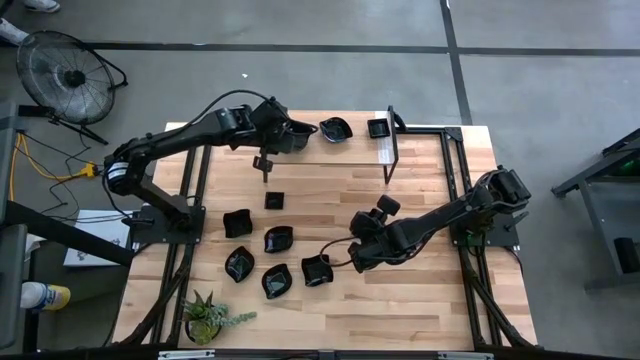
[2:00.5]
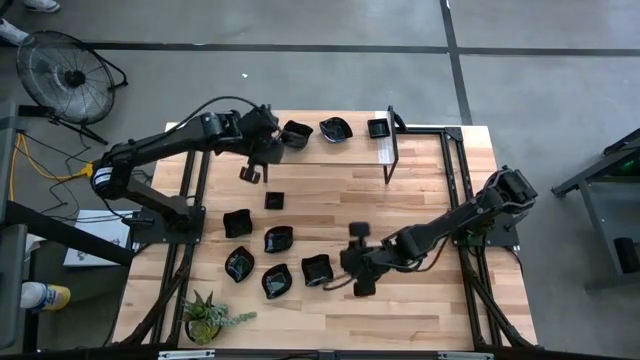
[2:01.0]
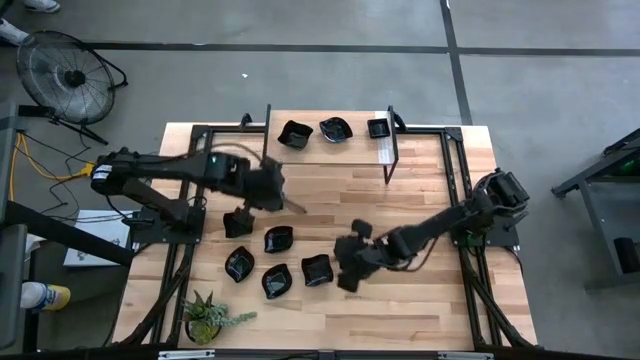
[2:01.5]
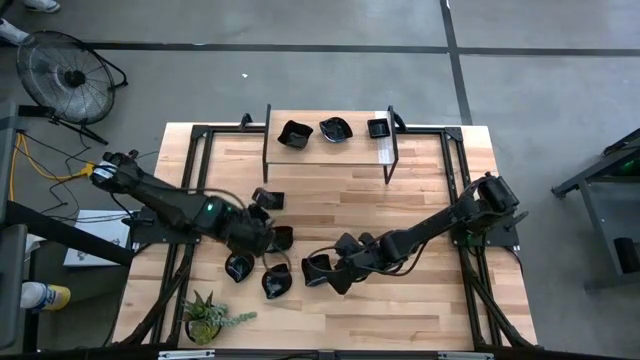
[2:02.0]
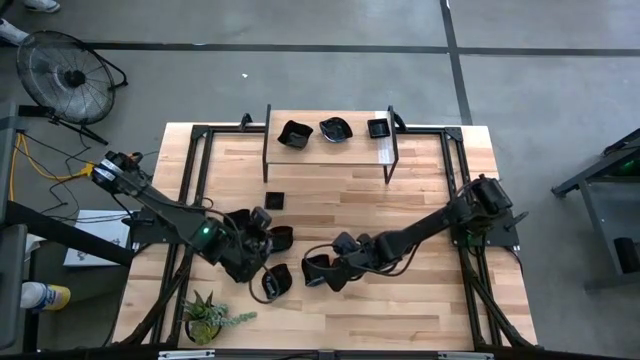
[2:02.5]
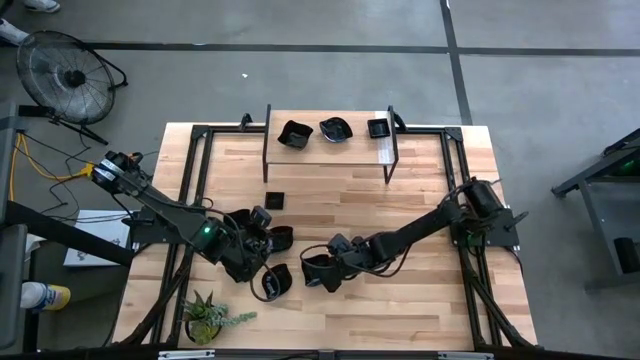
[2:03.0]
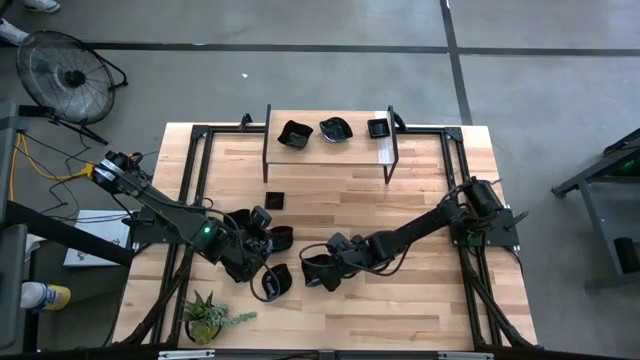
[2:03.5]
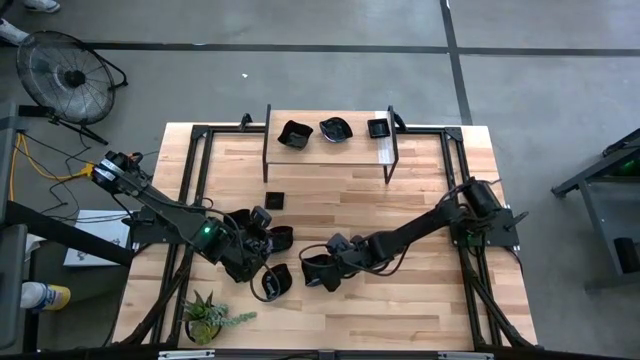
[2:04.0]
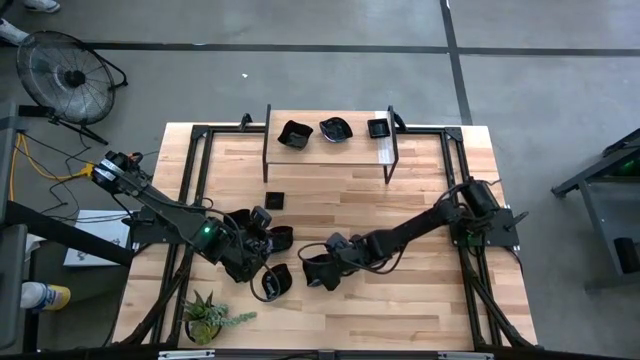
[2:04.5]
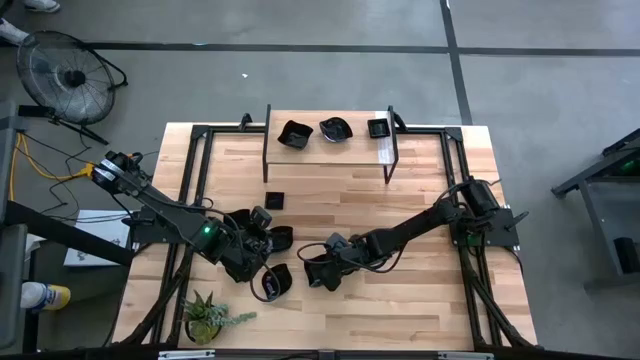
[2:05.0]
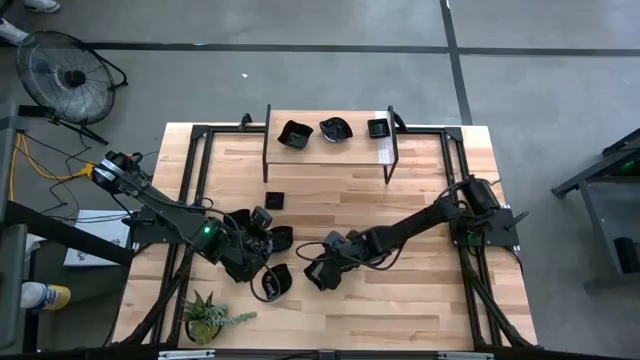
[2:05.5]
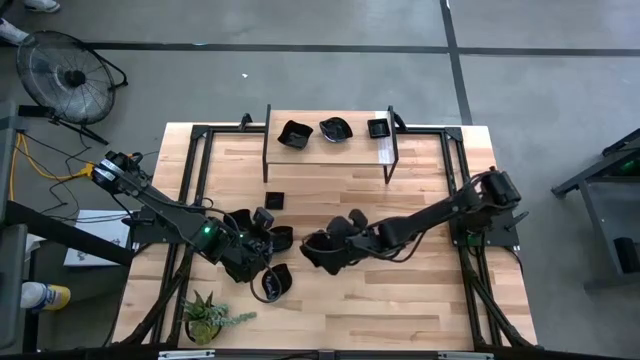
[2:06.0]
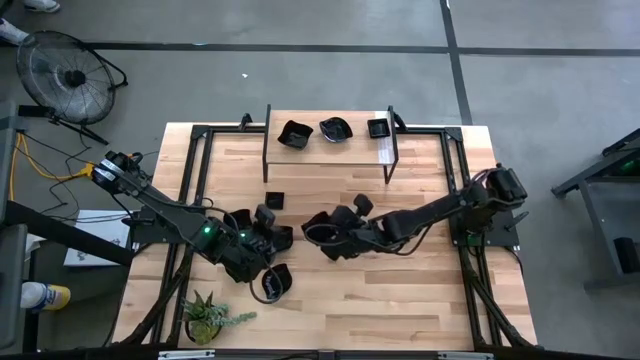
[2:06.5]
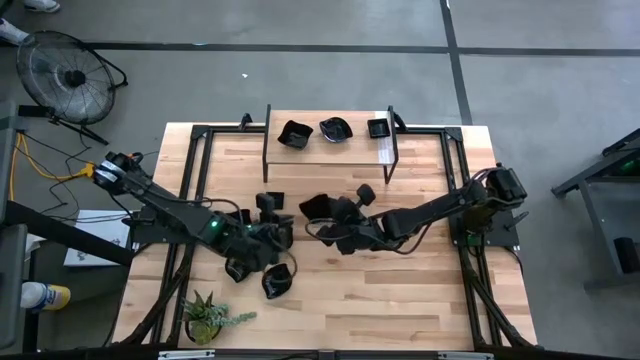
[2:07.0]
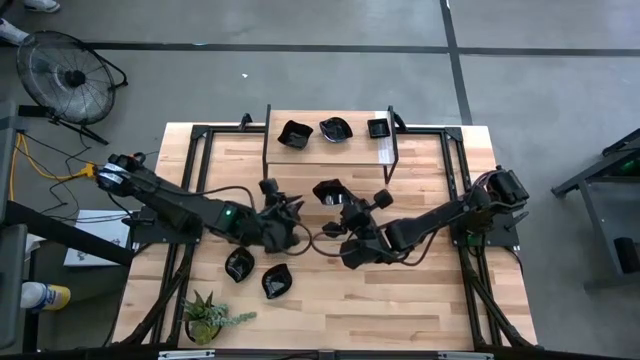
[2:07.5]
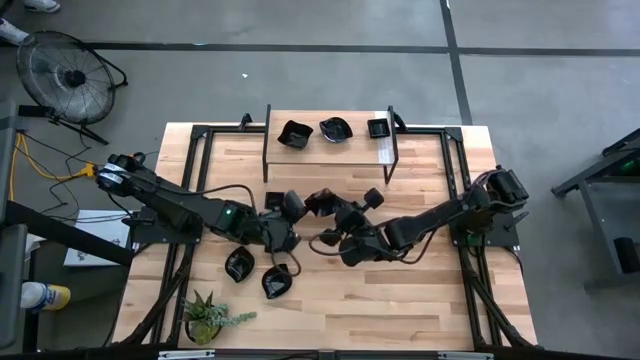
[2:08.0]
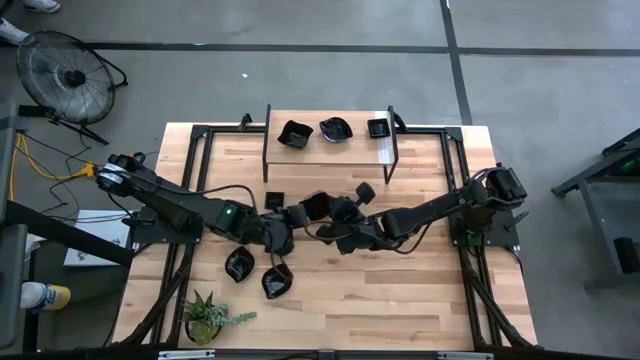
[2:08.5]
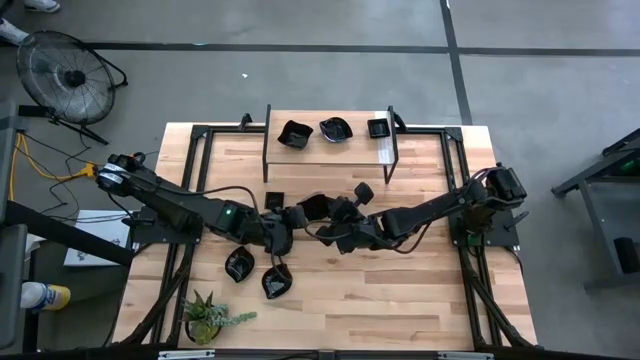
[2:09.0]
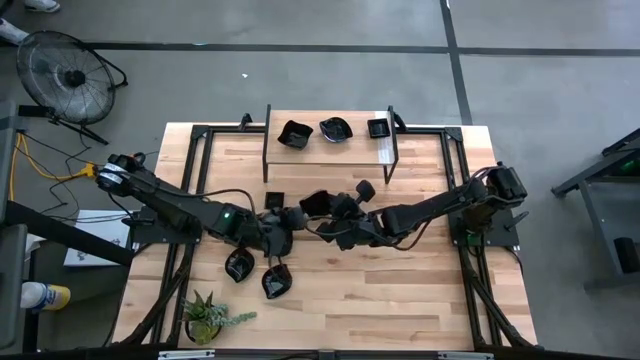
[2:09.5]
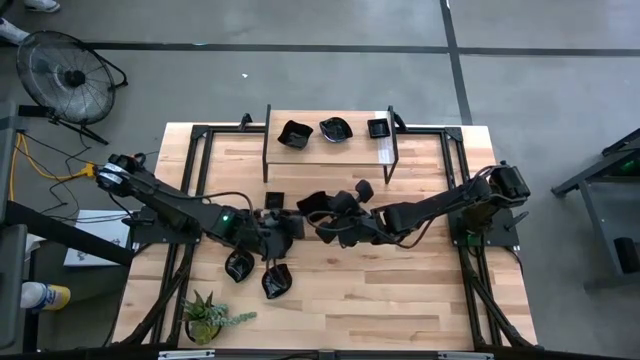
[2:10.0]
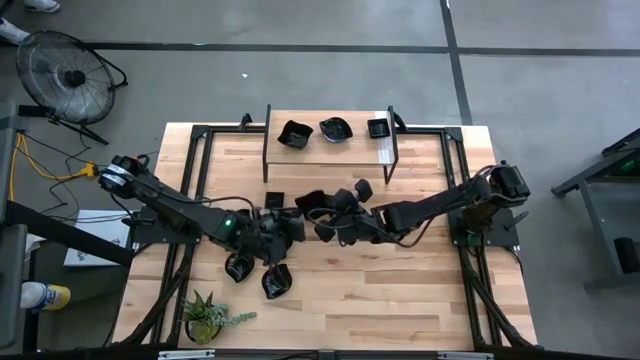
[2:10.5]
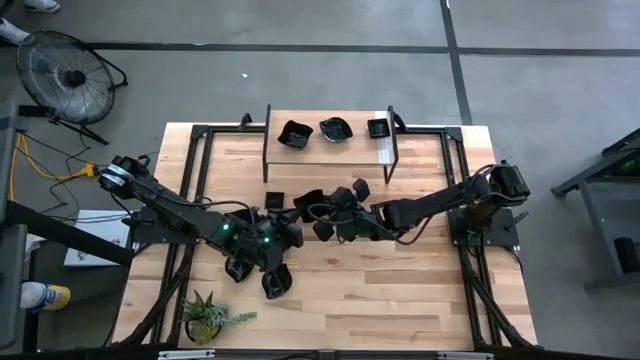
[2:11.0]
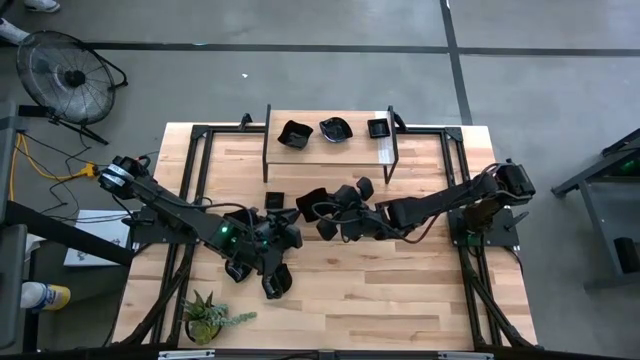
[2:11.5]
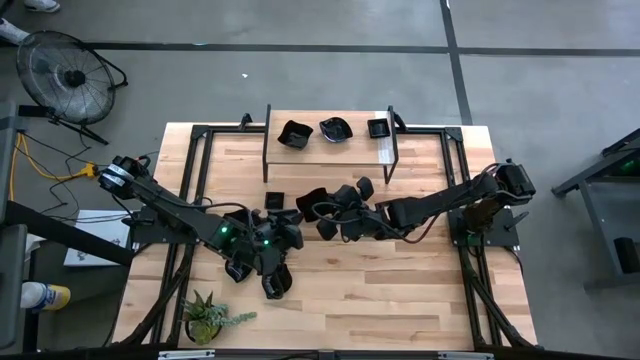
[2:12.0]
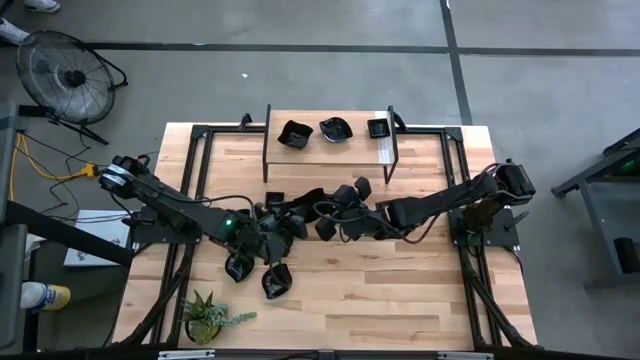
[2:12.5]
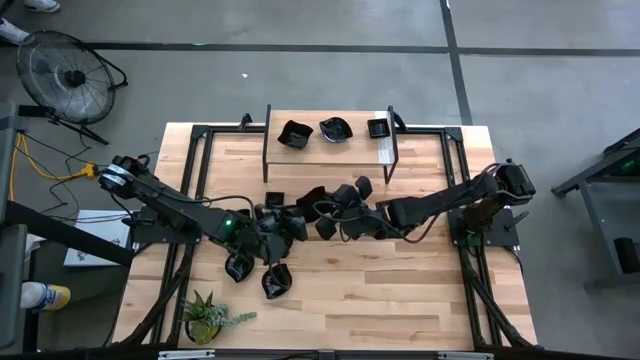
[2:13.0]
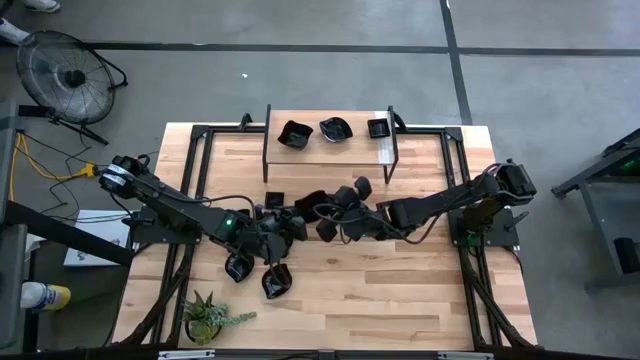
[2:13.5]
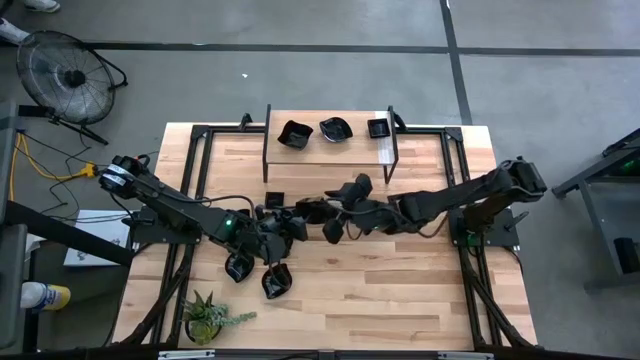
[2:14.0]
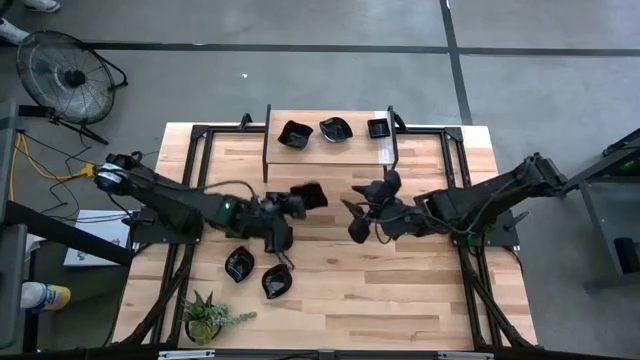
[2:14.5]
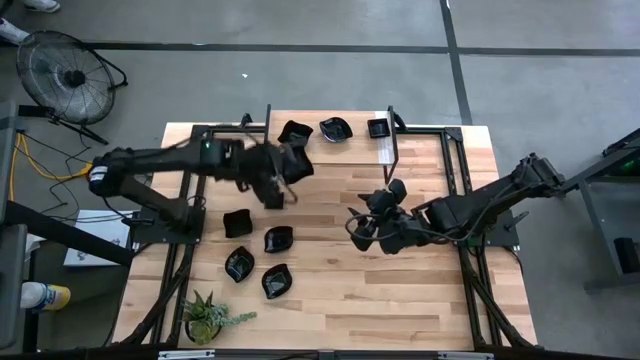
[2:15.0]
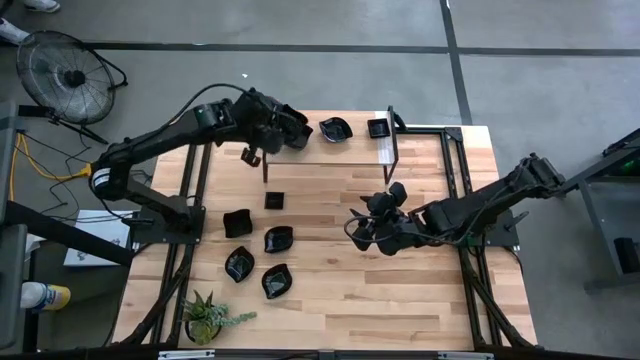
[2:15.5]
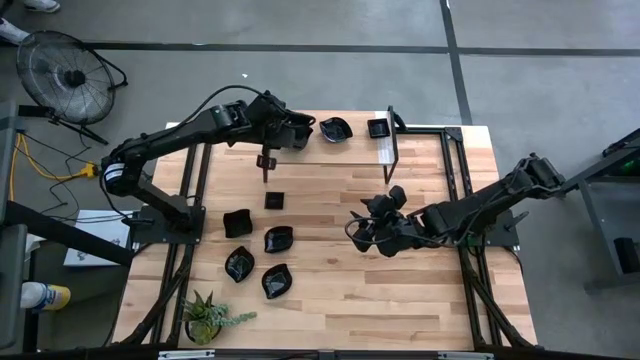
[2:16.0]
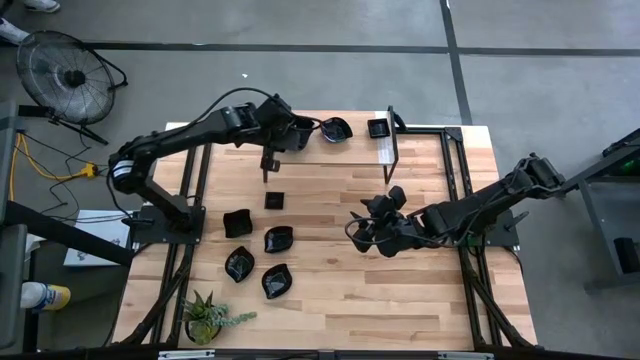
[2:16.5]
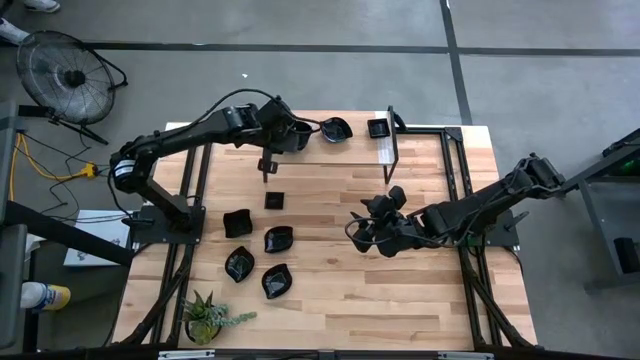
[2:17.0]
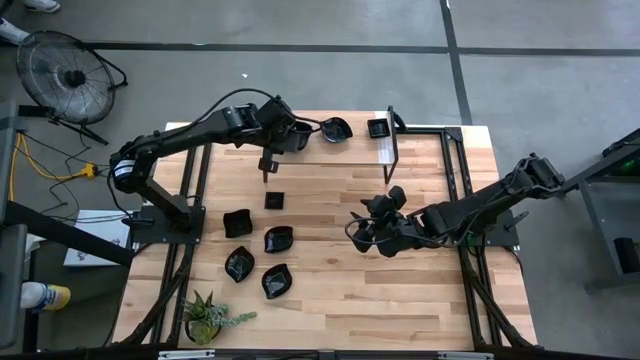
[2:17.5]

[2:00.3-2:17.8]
Task: Pick & Place Mini shaped plates
Stack the black distorted square plate on top of the black distorted square plate on the shelf

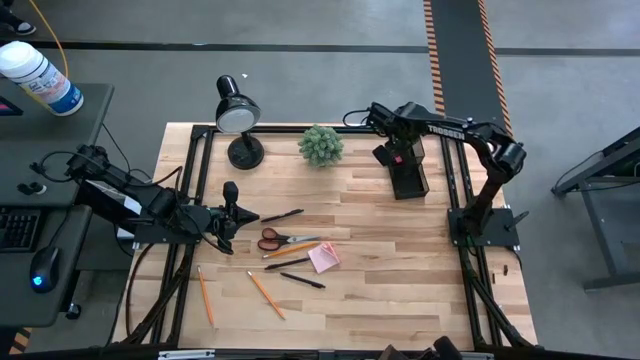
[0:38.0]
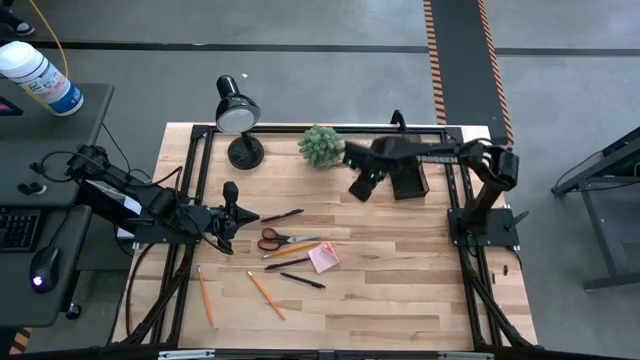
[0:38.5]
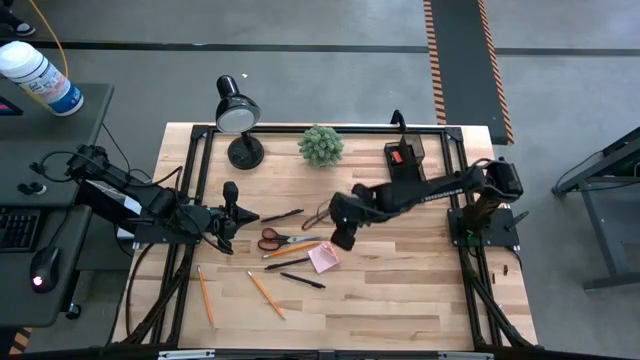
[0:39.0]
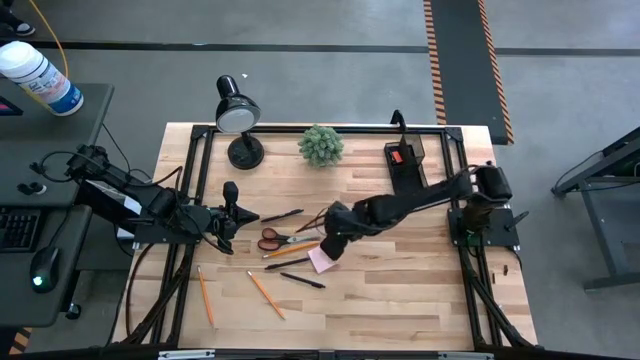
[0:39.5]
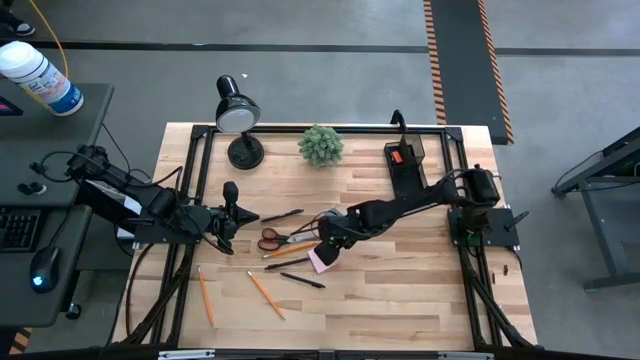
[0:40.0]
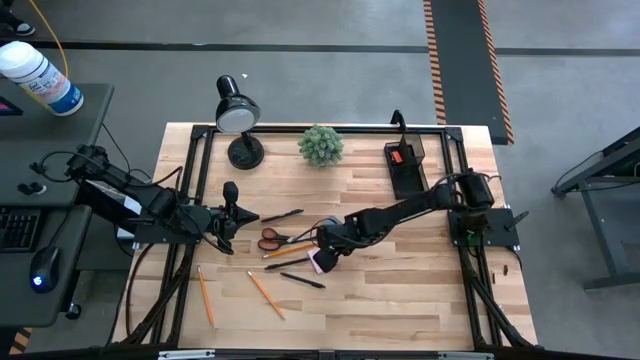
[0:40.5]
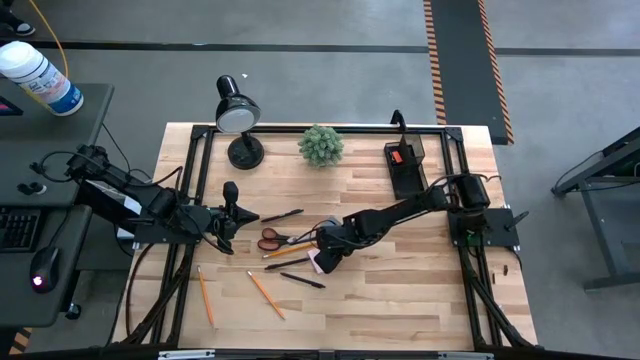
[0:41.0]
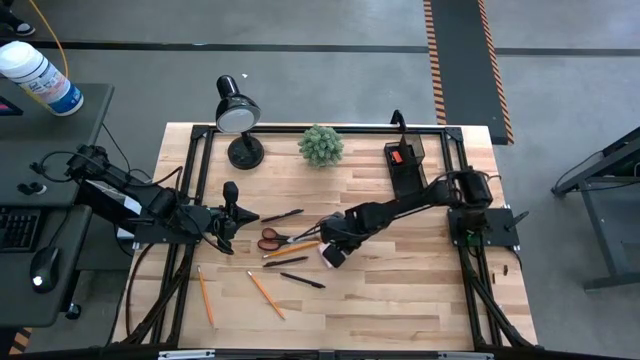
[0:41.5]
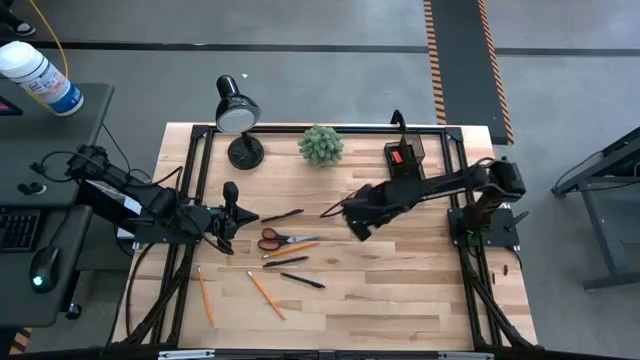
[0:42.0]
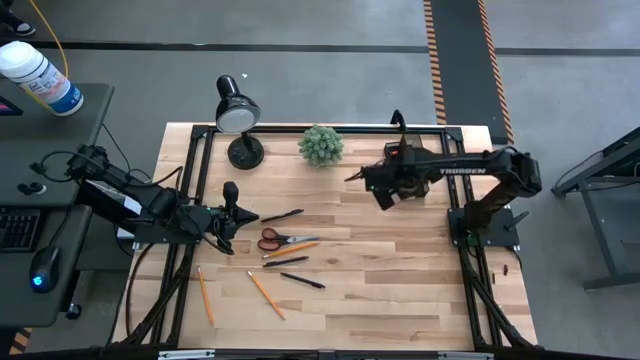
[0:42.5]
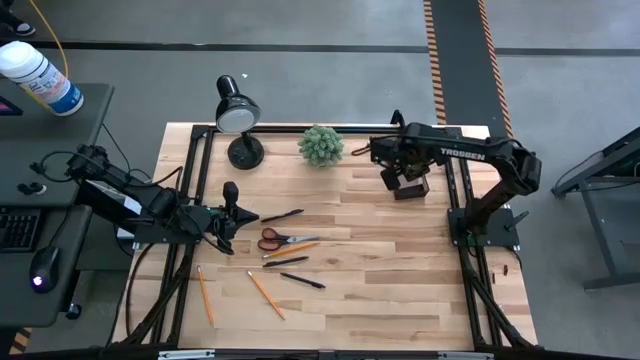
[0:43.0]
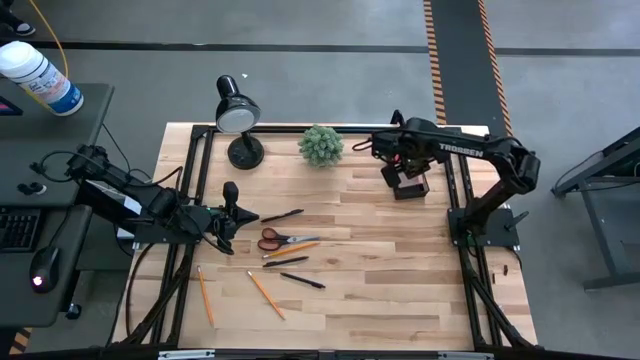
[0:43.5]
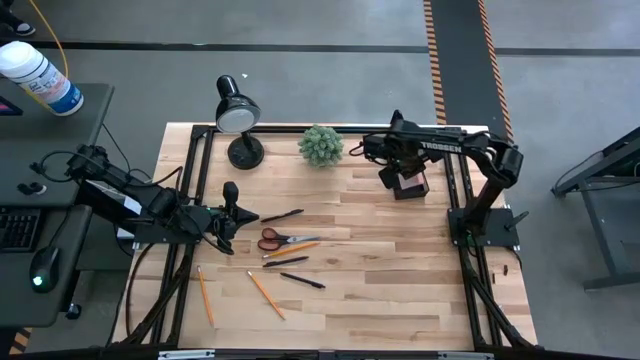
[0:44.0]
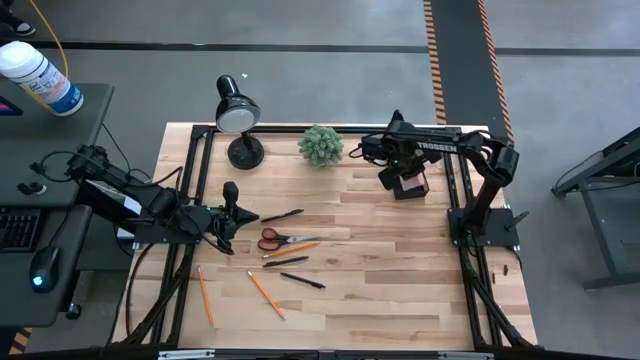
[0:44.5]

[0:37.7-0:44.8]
Task: Pick and place office supplies into organizer
Put the sticky note into the desk organizer
